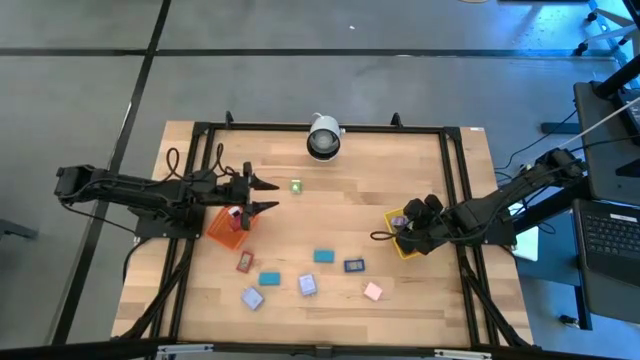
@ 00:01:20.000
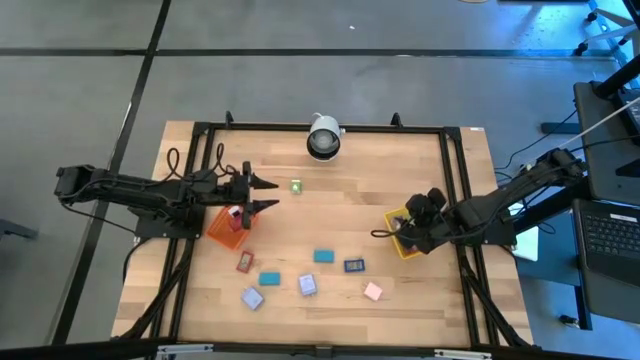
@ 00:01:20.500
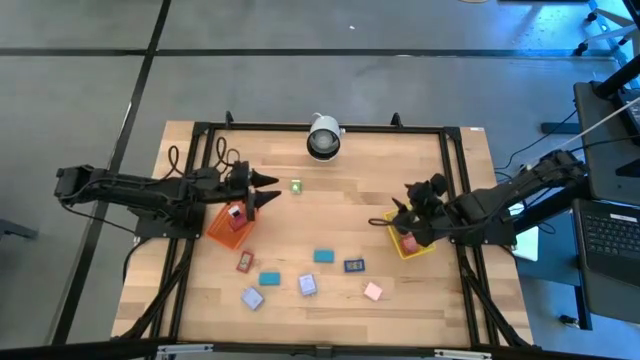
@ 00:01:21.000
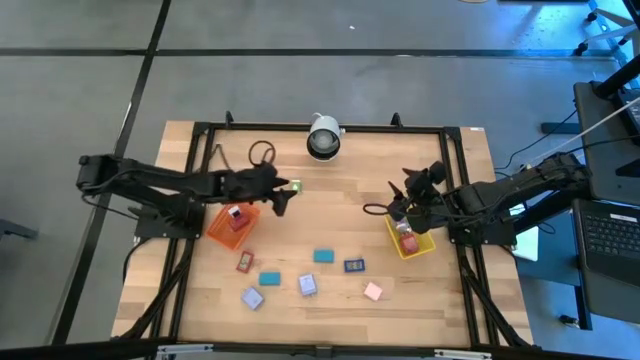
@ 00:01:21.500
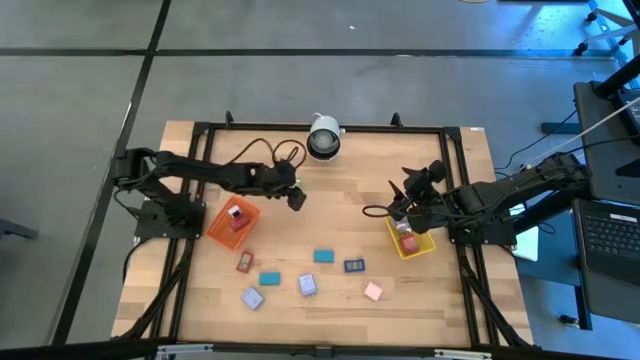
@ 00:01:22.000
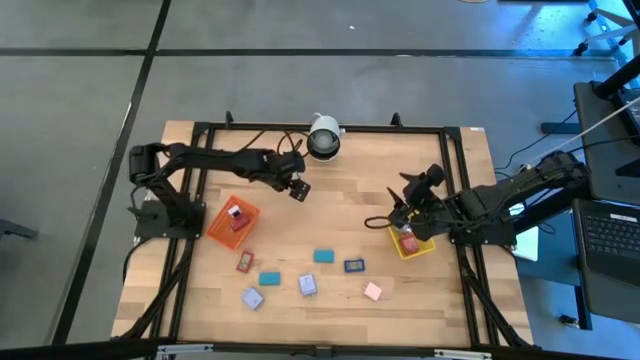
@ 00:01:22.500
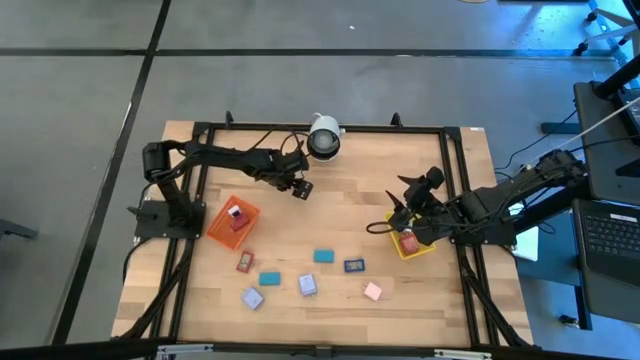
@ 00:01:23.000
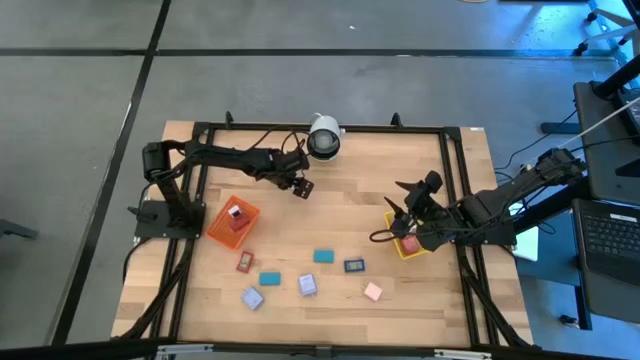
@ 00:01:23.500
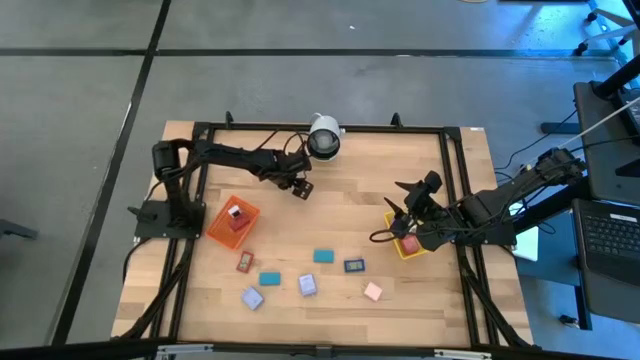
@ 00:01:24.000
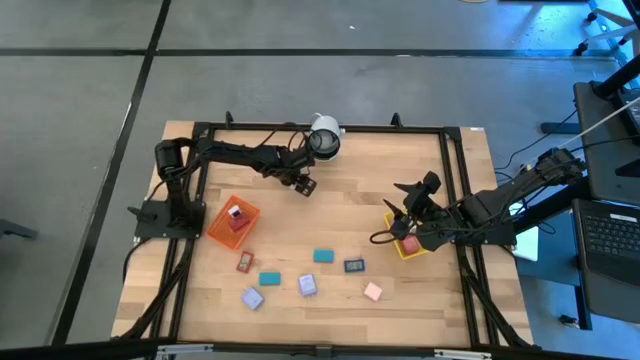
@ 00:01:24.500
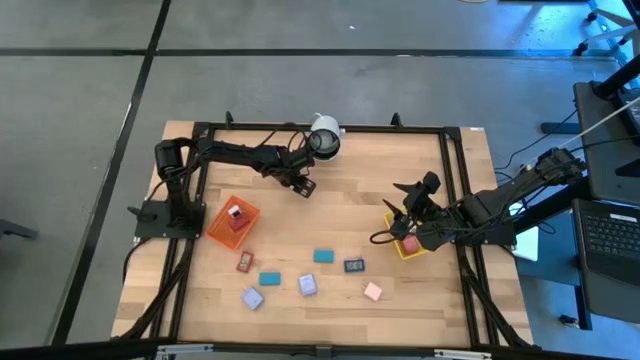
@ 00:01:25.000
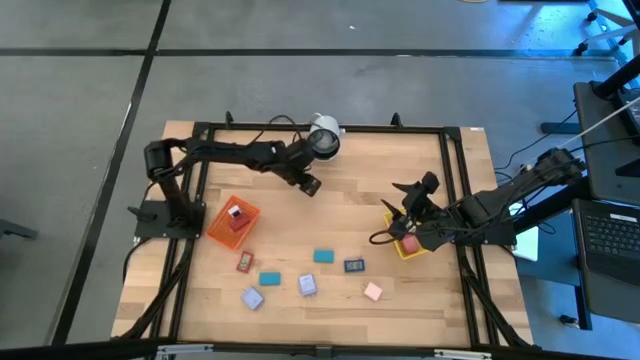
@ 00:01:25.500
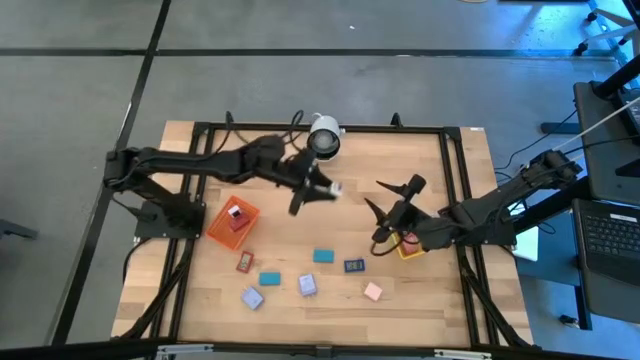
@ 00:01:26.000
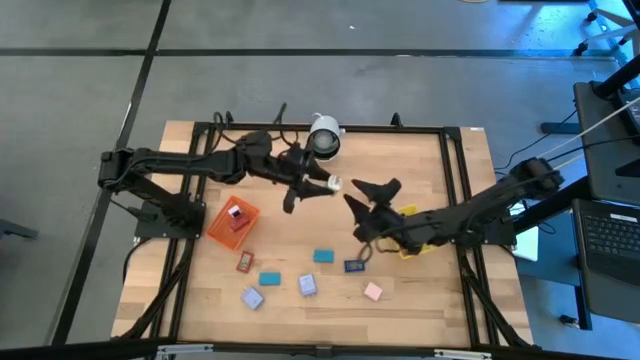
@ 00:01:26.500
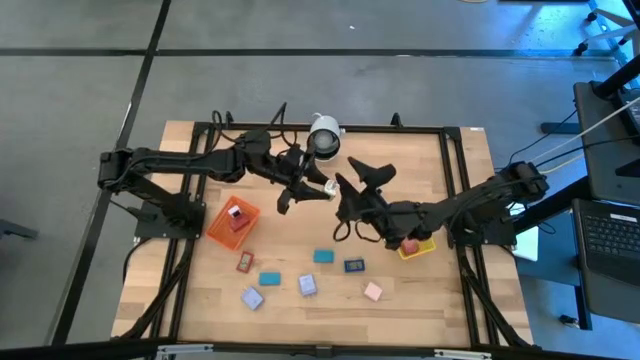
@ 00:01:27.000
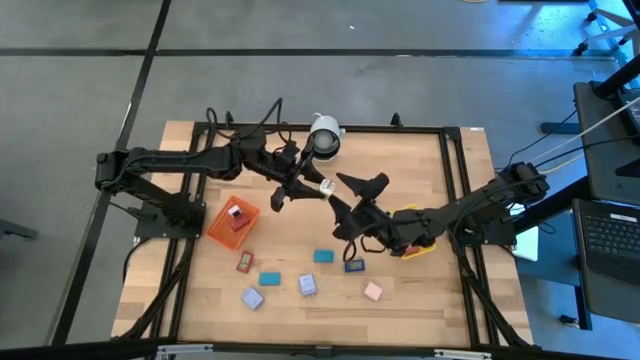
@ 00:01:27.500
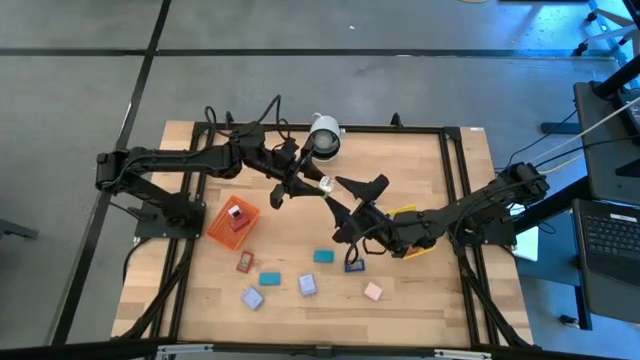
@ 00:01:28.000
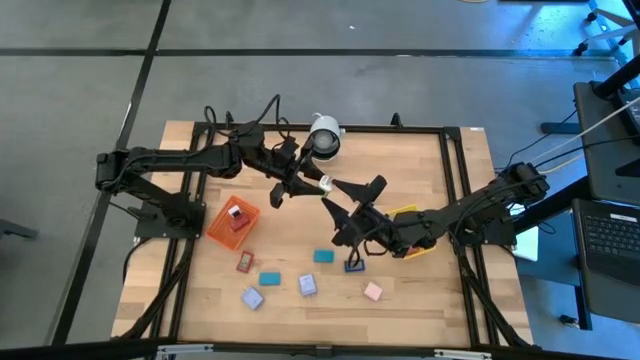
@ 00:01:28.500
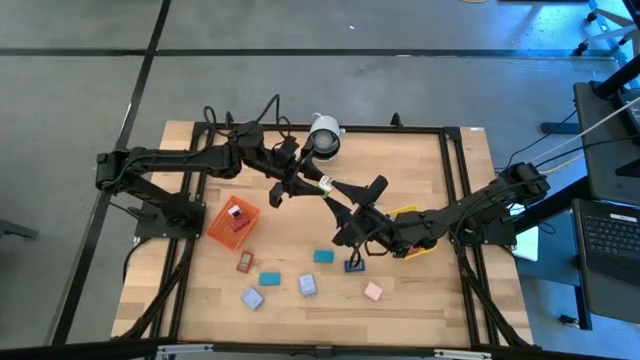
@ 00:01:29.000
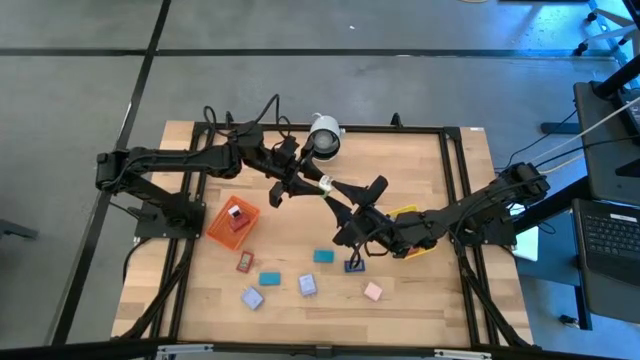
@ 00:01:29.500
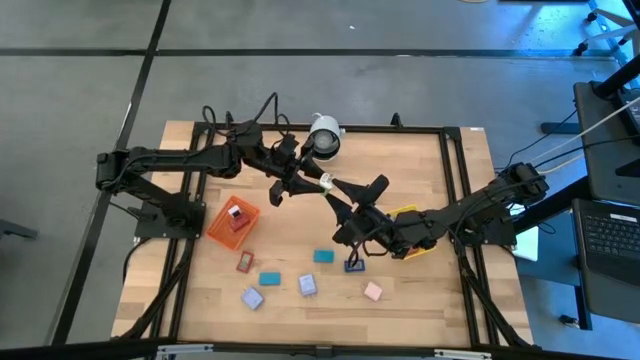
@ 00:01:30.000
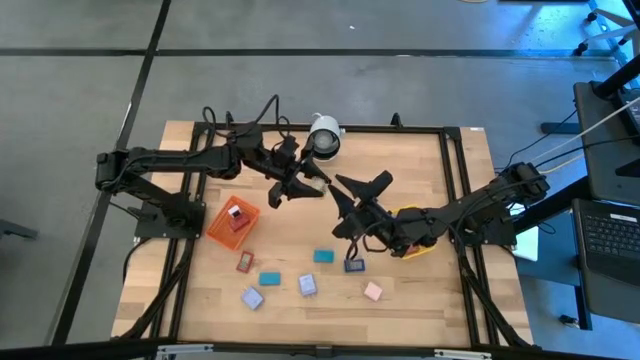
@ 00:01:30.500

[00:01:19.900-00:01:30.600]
Task: Pick & Place Office items
Put the green charger adapter into the yellow basket

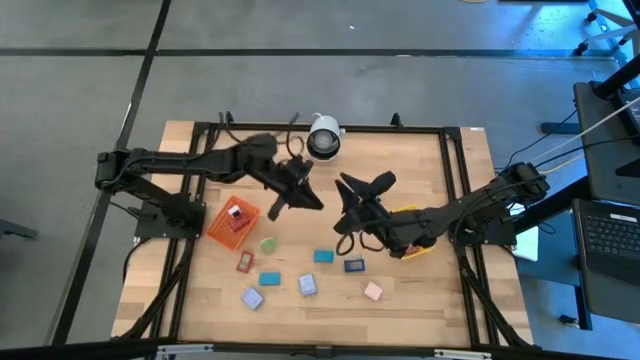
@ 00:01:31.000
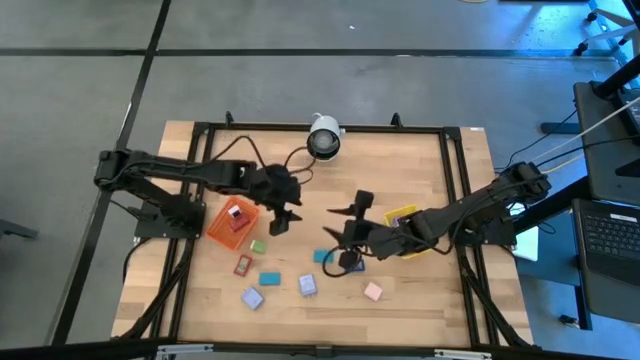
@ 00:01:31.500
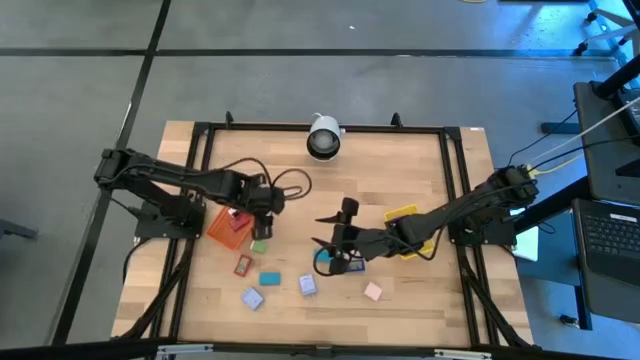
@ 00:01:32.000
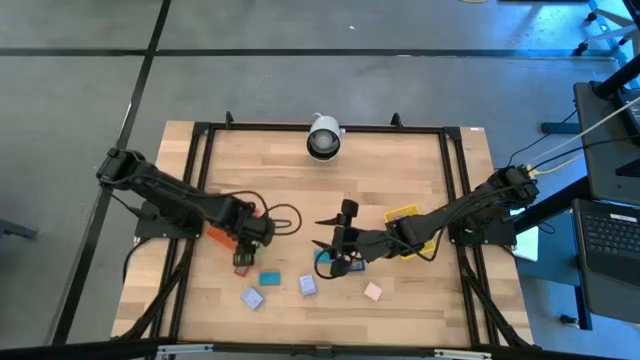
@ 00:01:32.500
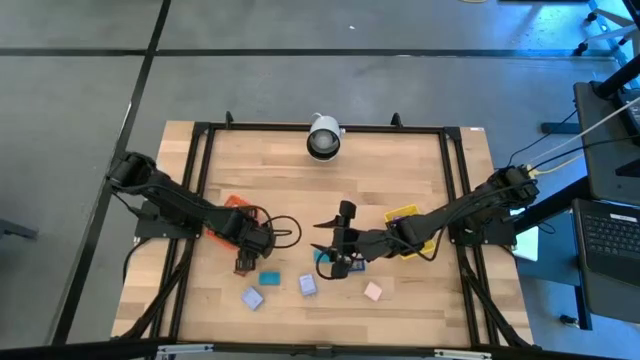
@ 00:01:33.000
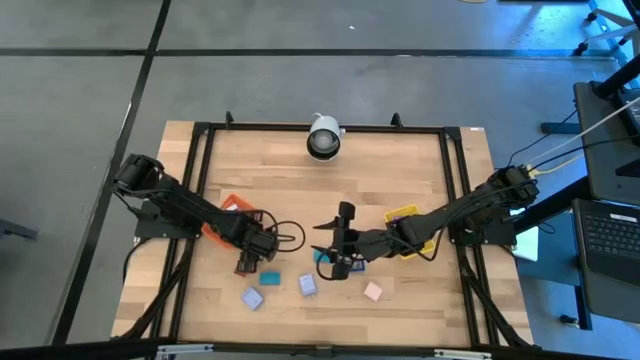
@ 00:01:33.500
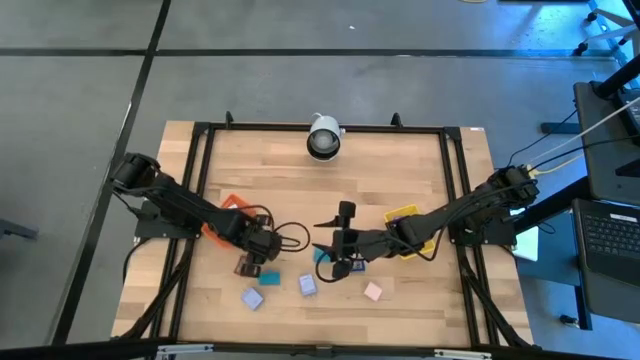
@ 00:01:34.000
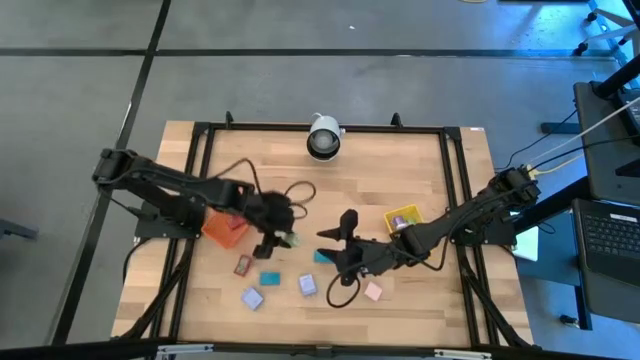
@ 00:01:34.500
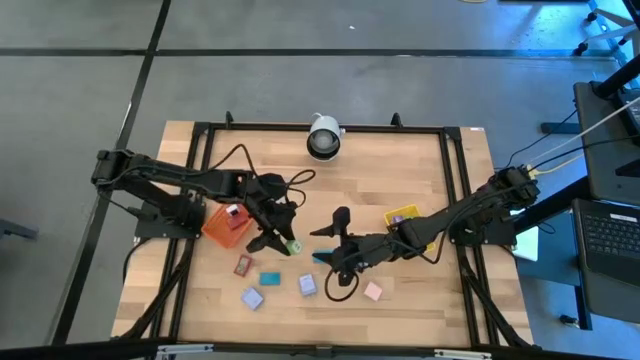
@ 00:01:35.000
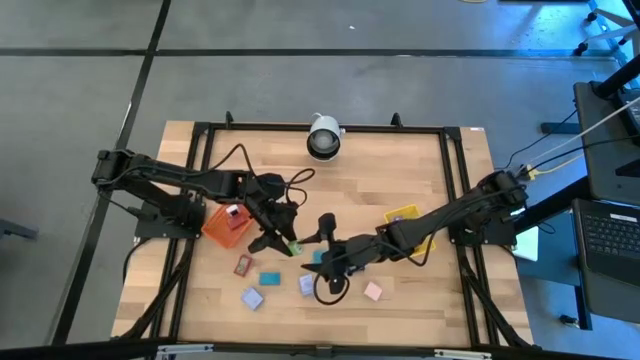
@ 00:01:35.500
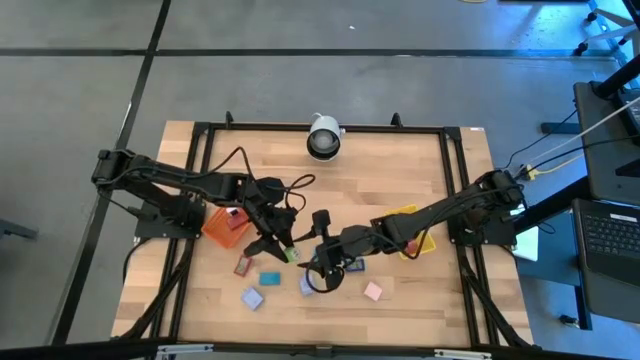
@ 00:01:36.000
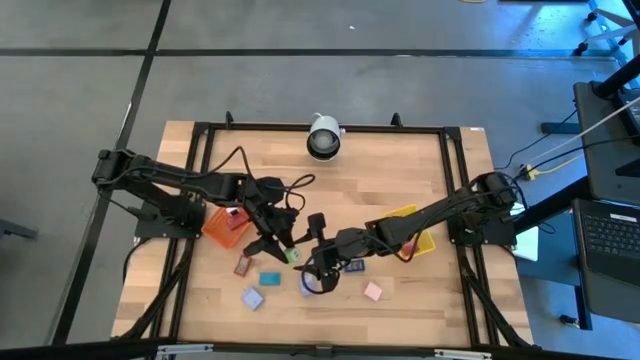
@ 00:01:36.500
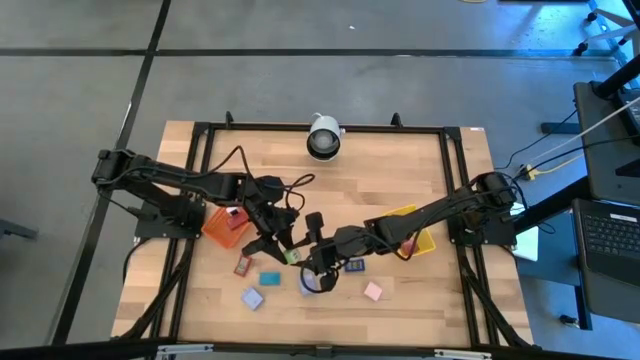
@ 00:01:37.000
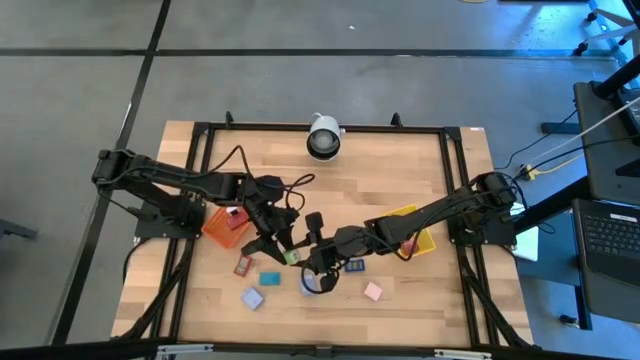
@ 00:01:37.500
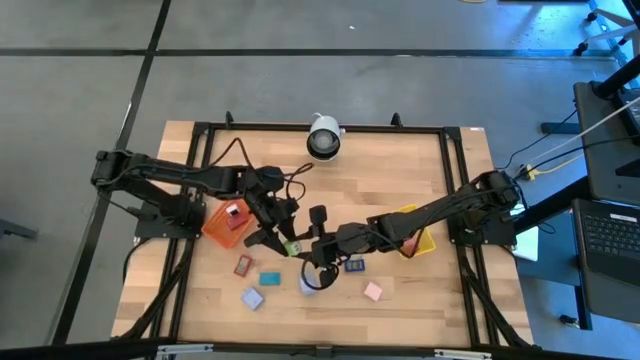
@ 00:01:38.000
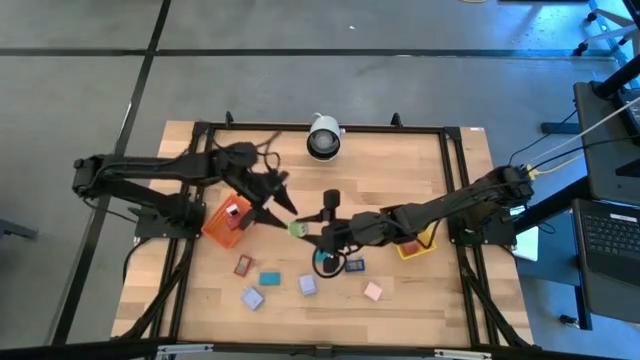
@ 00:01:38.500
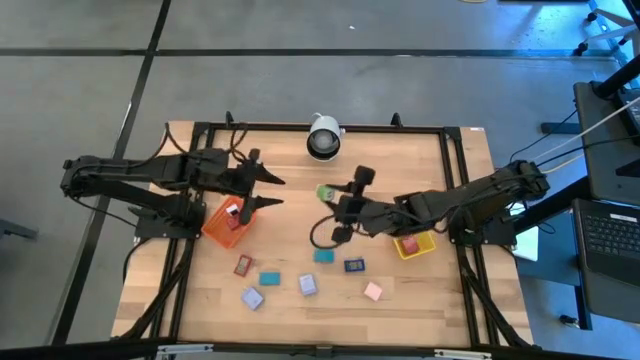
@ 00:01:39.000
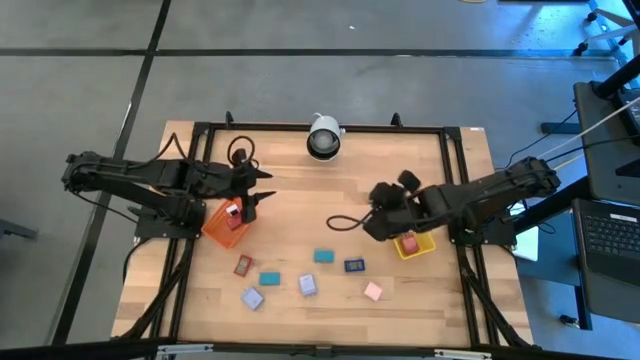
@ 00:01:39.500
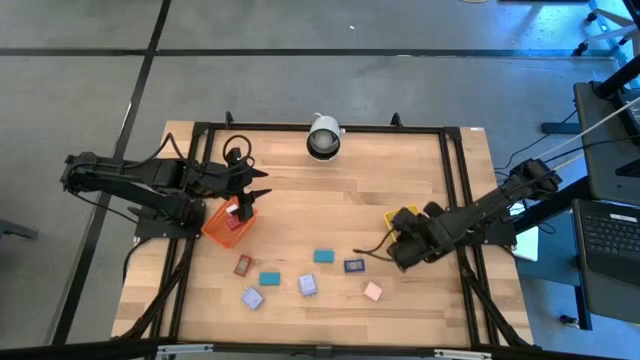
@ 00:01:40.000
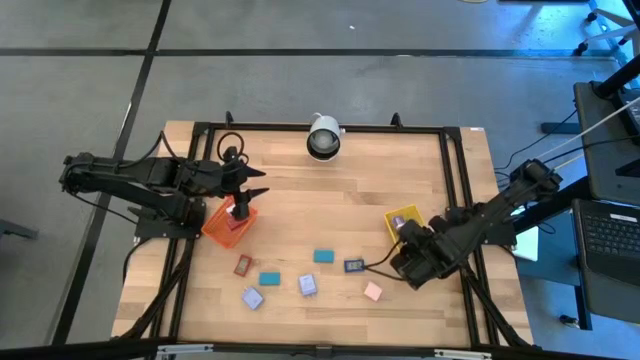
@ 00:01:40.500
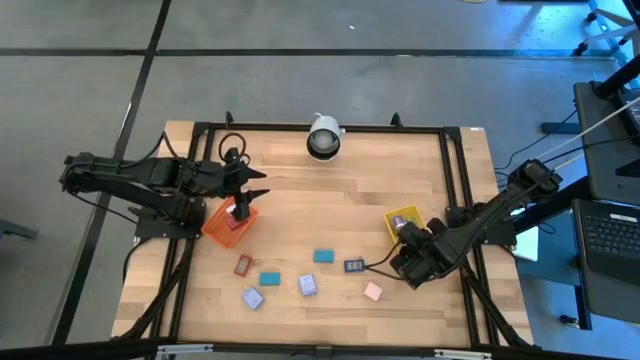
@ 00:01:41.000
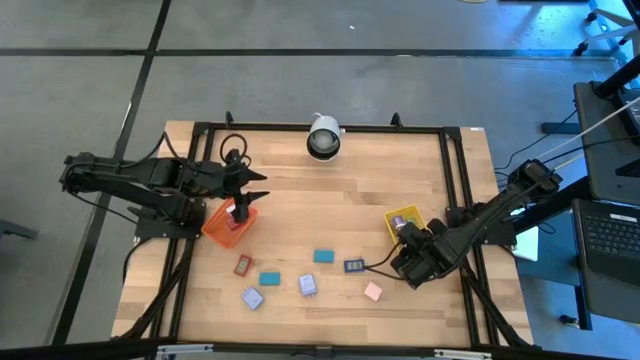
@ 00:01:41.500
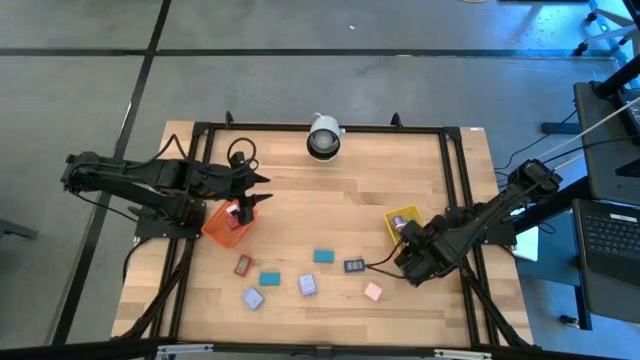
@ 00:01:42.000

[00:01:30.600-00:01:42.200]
Put the green charger adapter into the yellow basket
